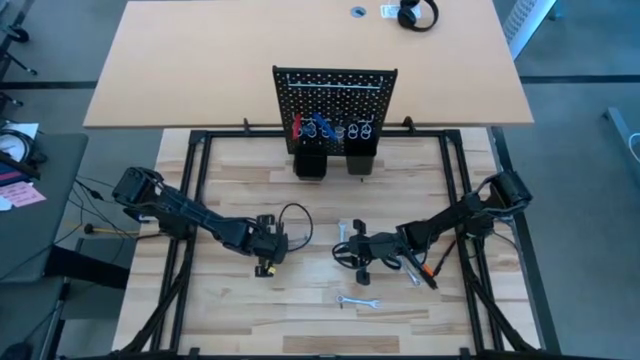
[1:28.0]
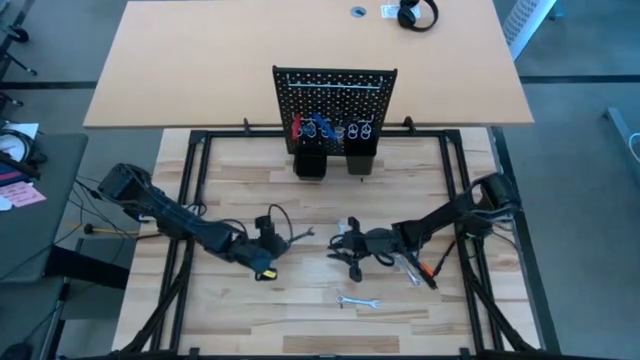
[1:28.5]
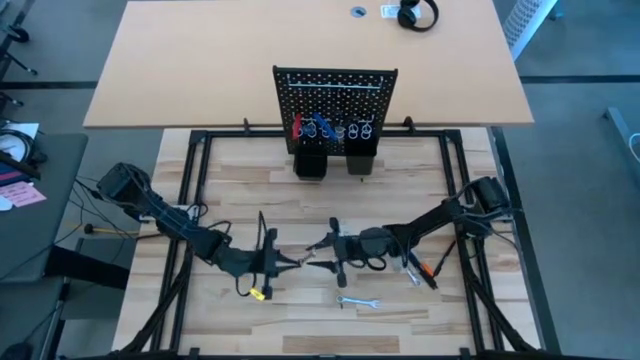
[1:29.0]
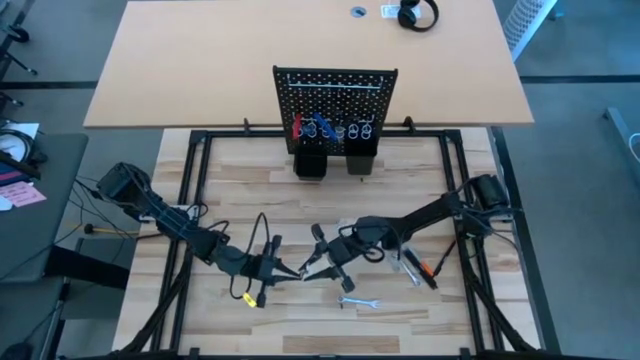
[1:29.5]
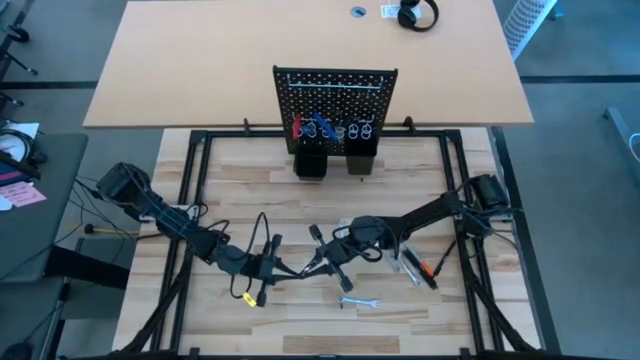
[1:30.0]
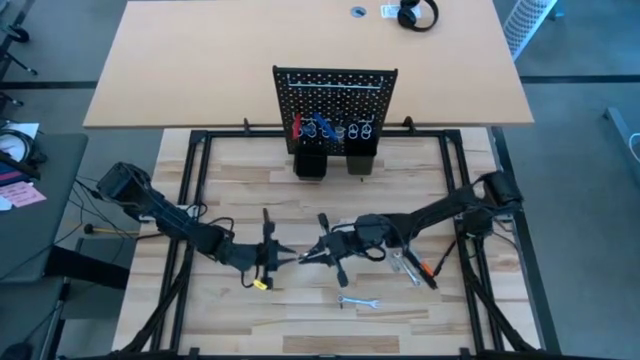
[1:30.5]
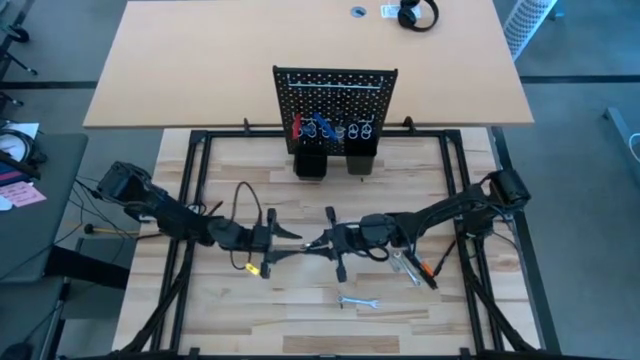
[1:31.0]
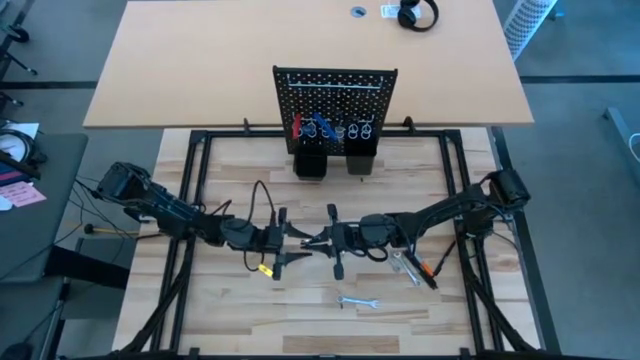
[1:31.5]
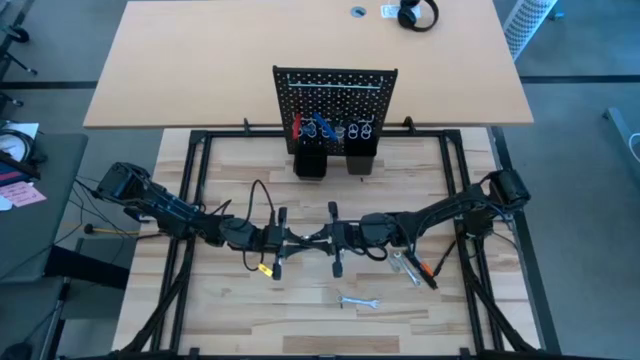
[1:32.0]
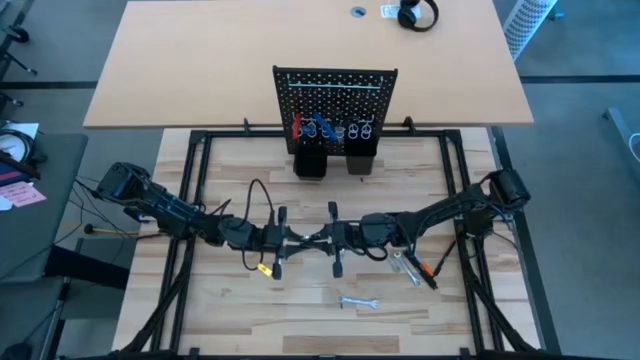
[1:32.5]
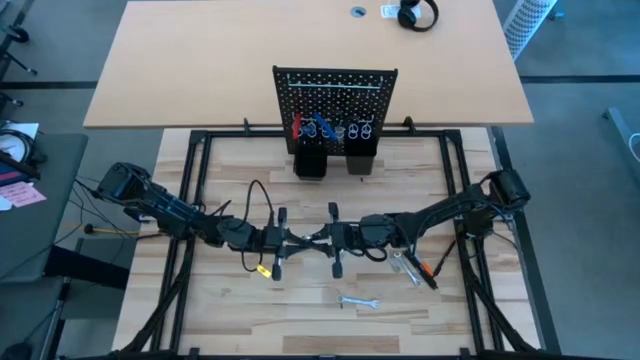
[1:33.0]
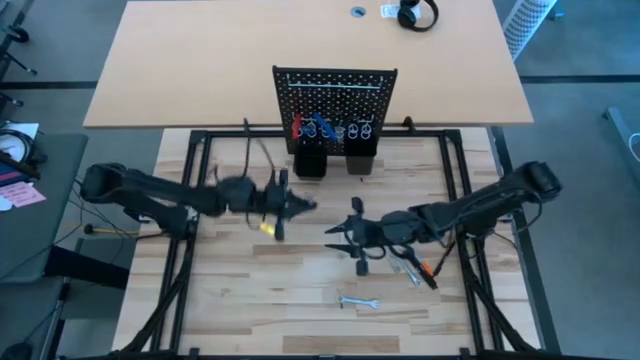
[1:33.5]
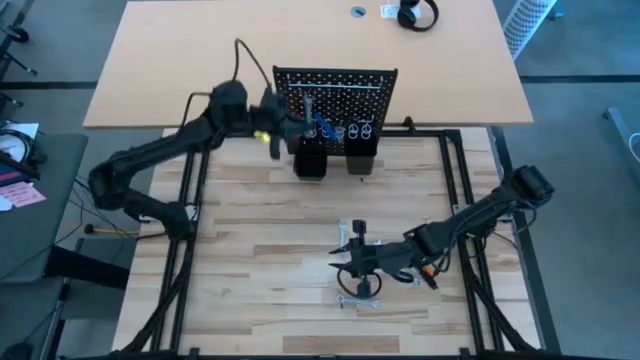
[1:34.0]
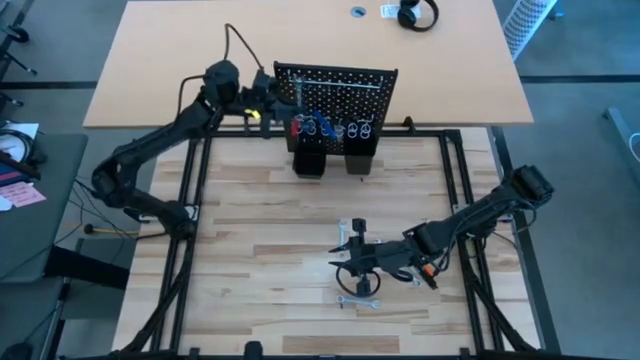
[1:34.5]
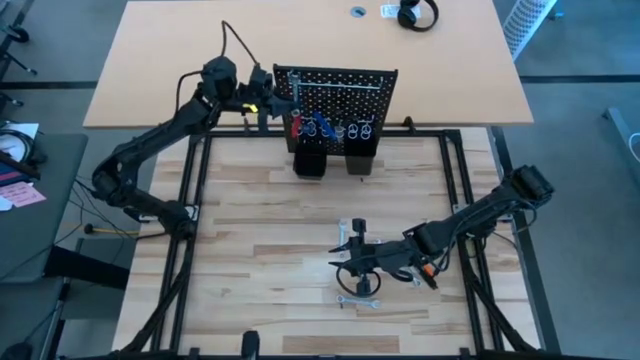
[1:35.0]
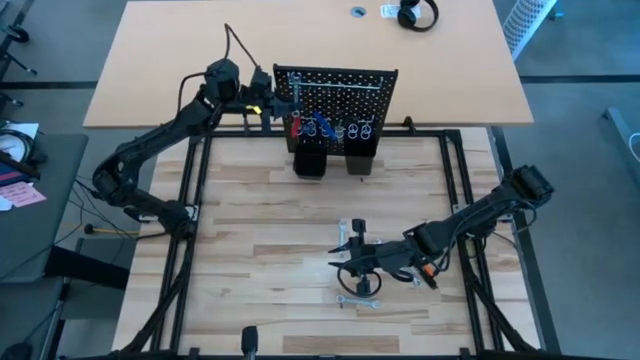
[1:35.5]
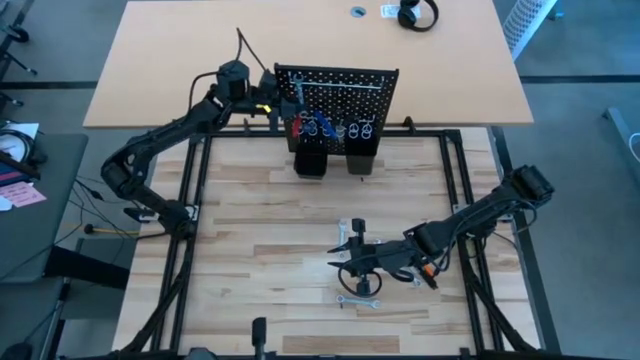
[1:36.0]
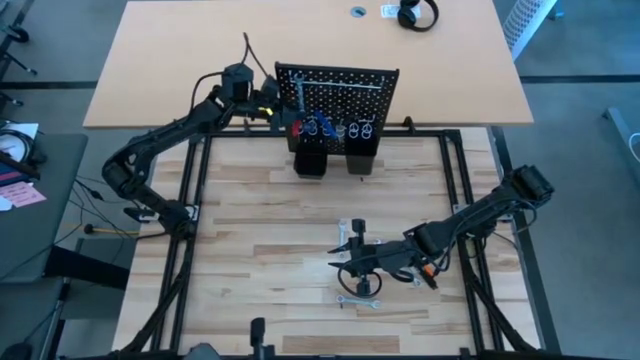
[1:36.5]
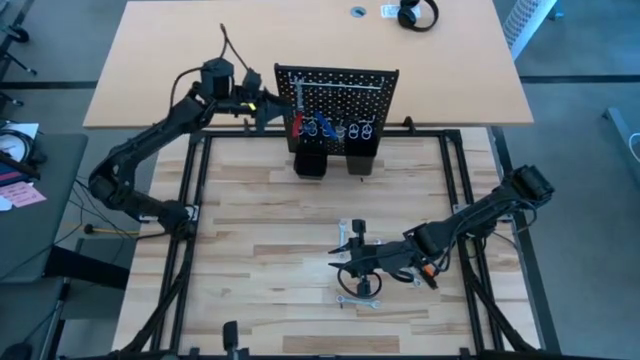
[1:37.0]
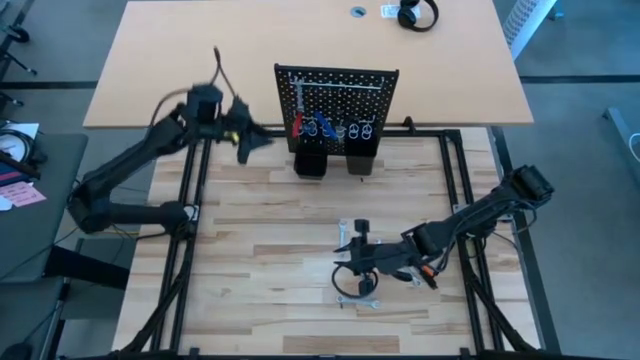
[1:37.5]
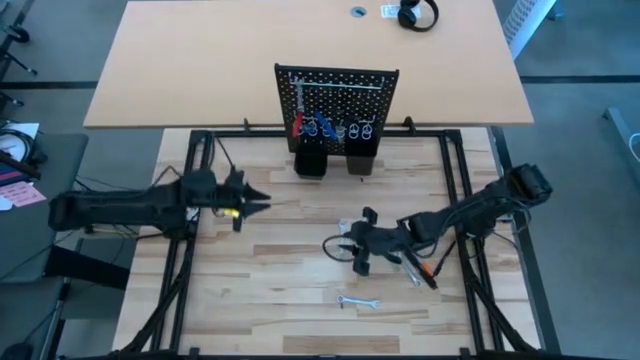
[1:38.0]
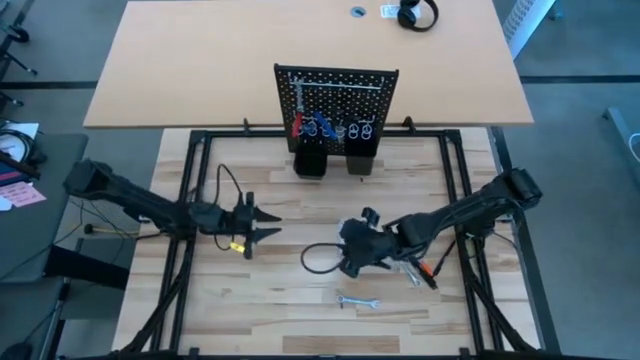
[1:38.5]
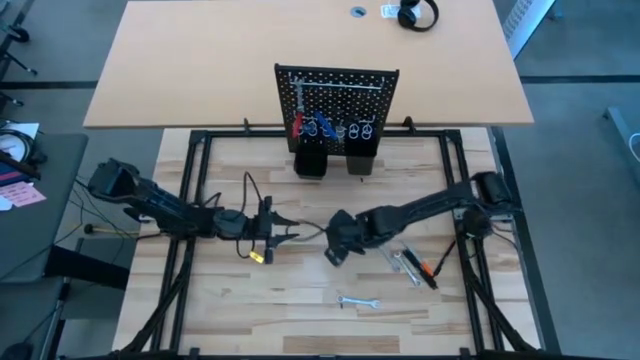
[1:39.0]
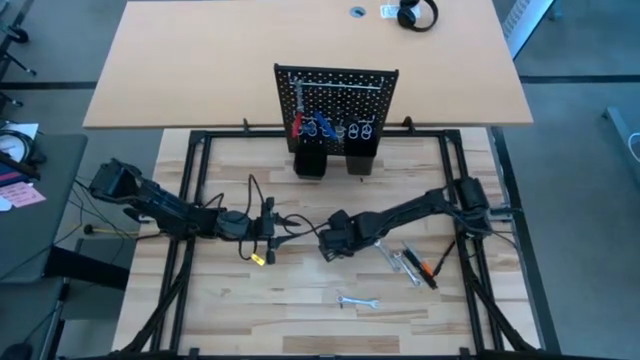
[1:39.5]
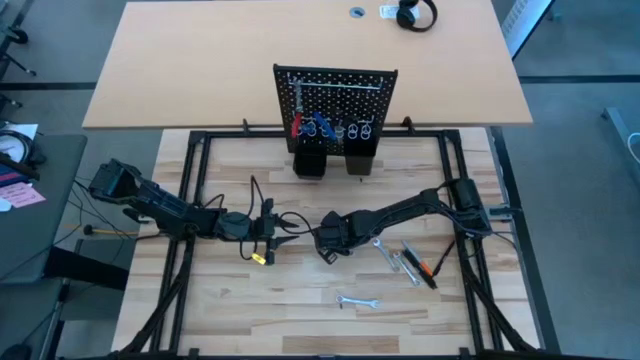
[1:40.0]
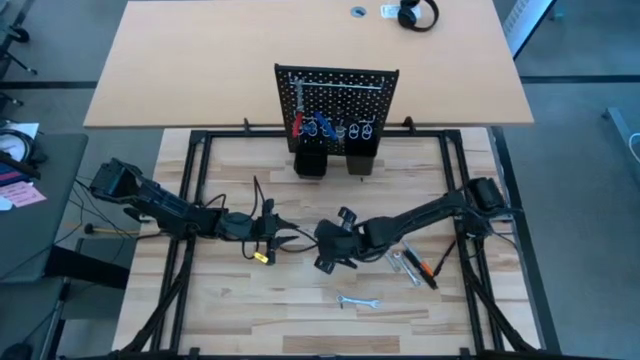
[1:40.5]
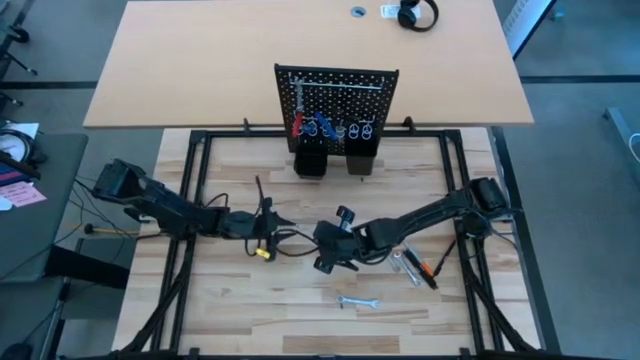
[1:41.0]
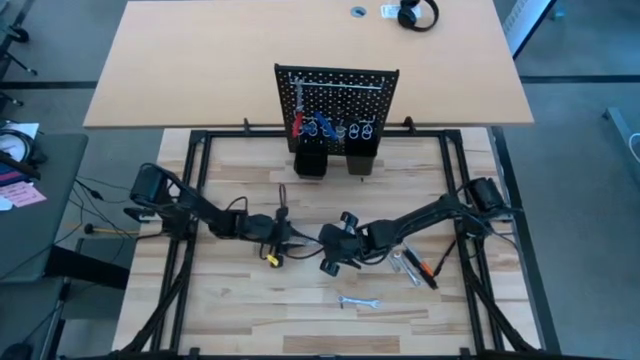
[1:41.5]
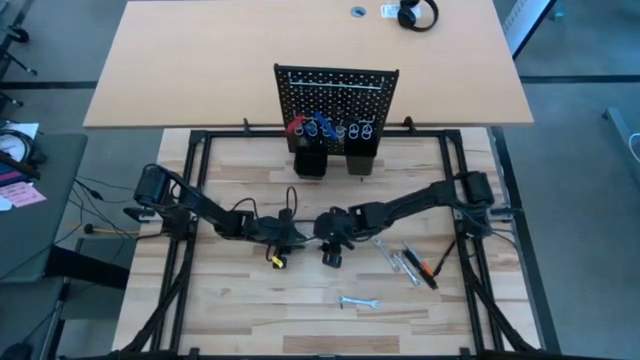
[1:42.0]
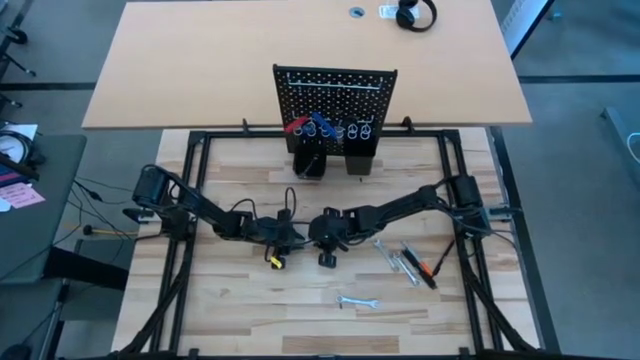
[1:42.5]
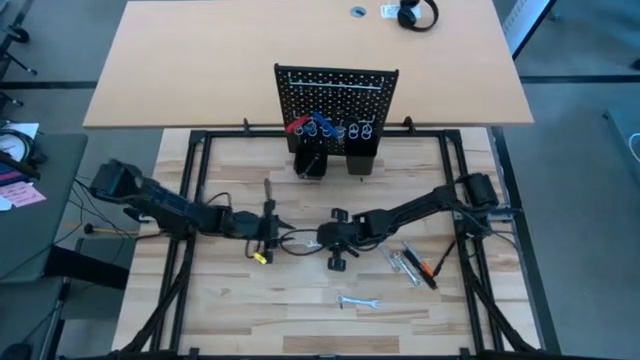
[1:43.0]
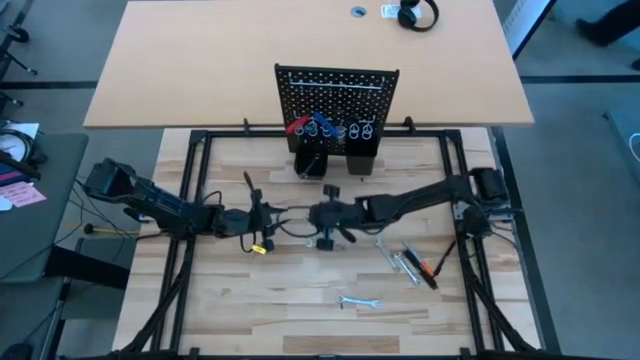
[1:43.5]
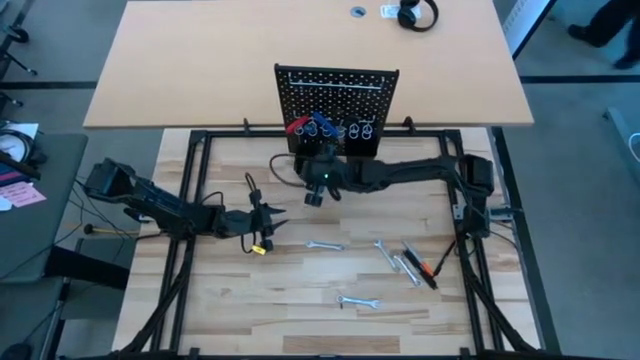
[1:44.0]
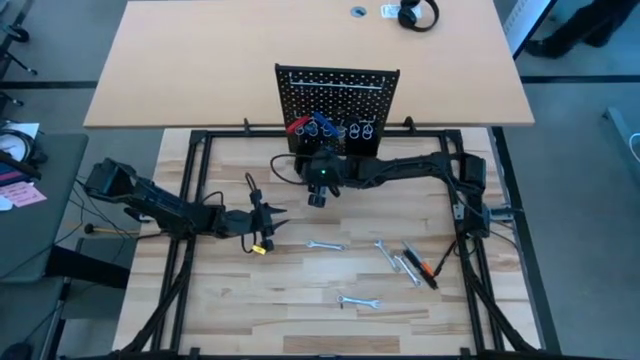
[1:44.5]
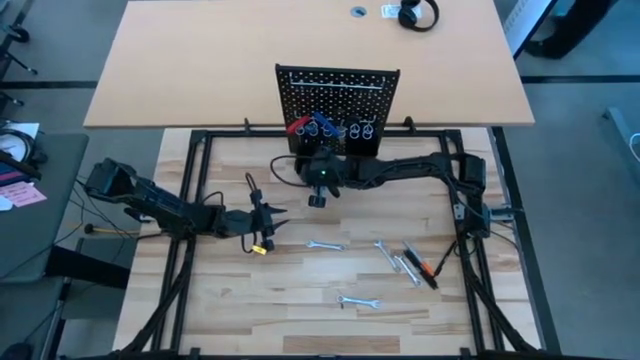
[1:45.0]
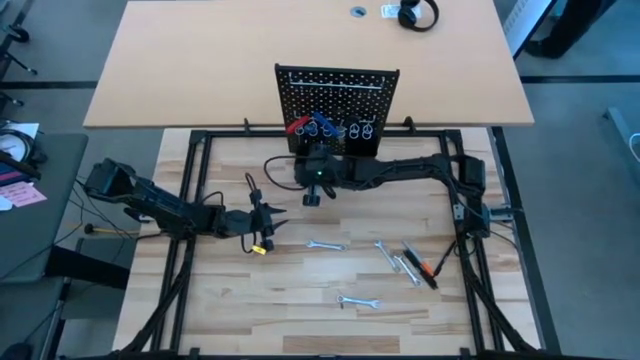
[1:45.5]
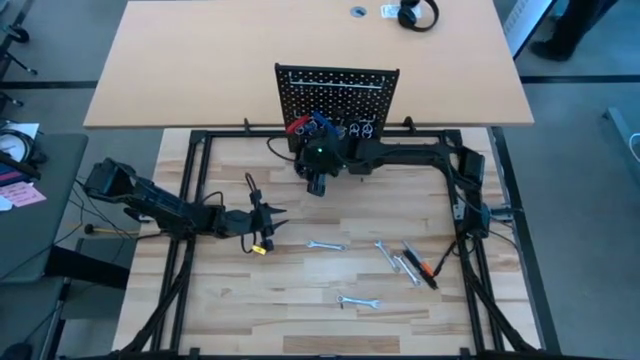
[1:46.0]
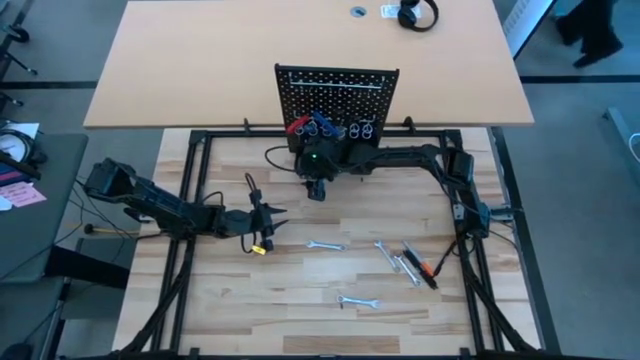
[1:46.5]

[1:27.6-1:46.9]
Task: Hang tools onto peg board
Hang the wrench on the pegboard
